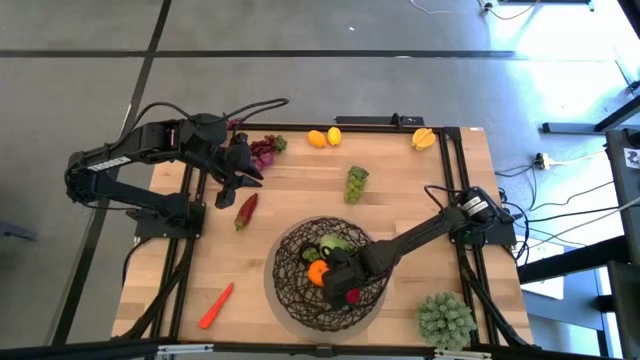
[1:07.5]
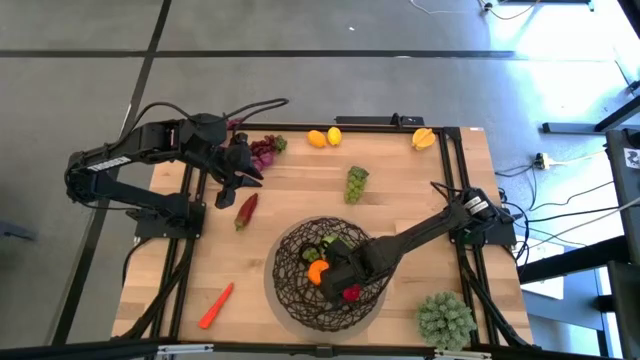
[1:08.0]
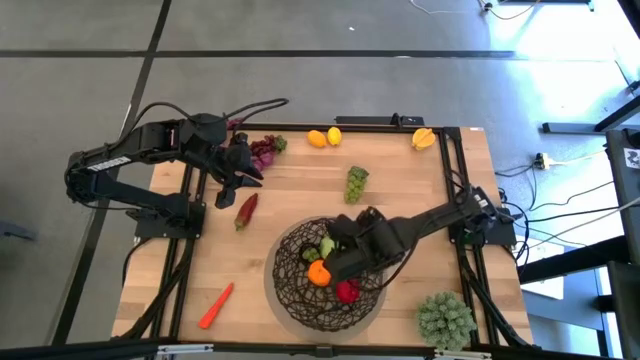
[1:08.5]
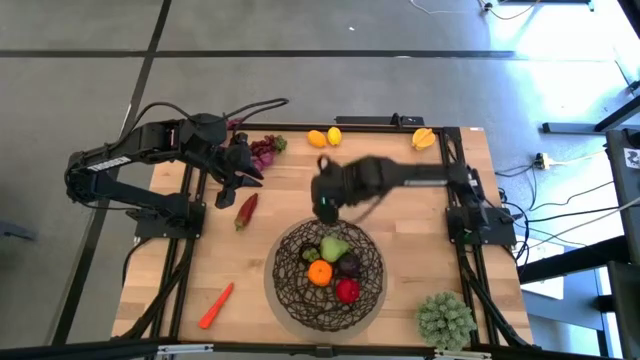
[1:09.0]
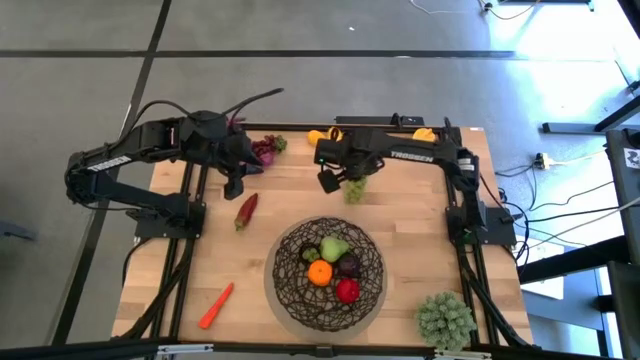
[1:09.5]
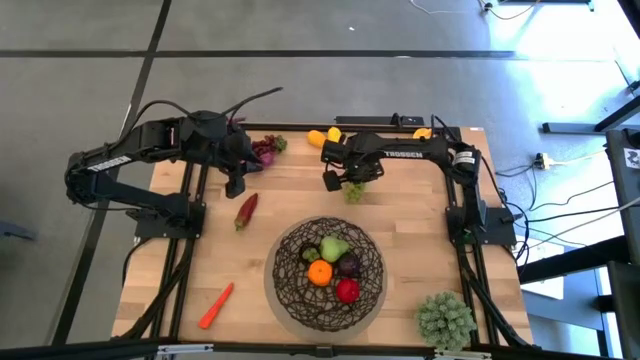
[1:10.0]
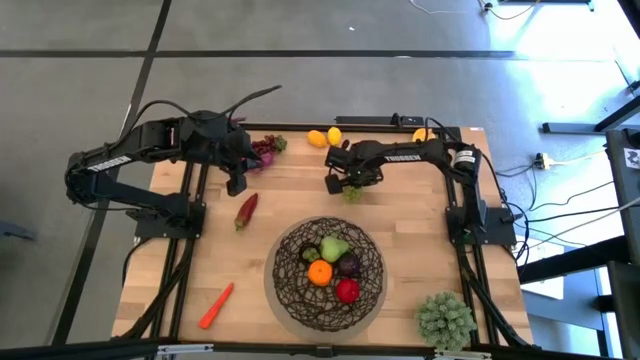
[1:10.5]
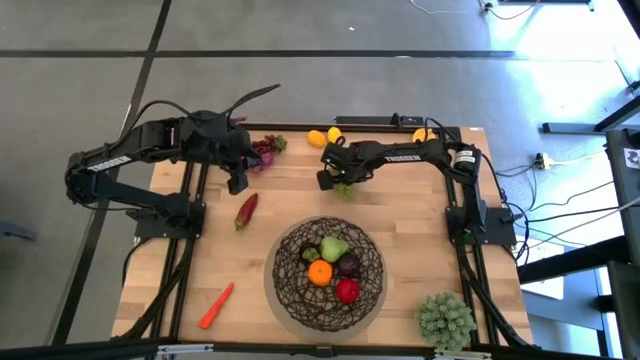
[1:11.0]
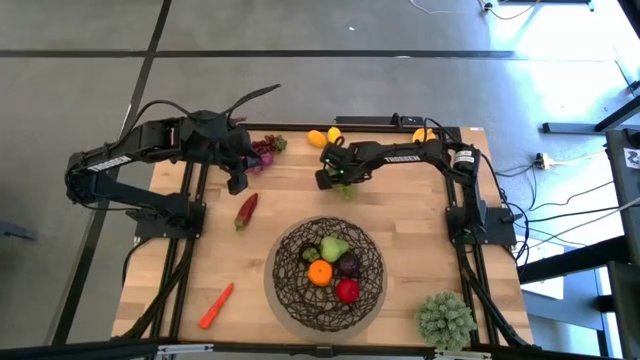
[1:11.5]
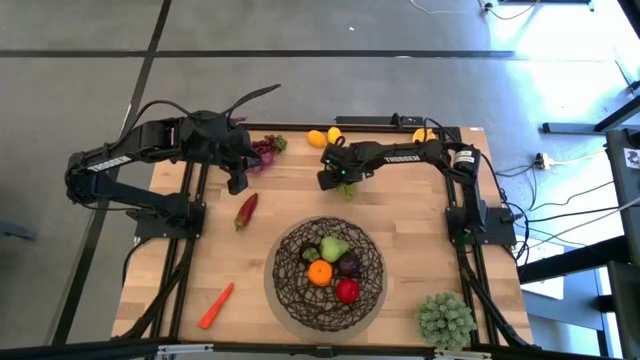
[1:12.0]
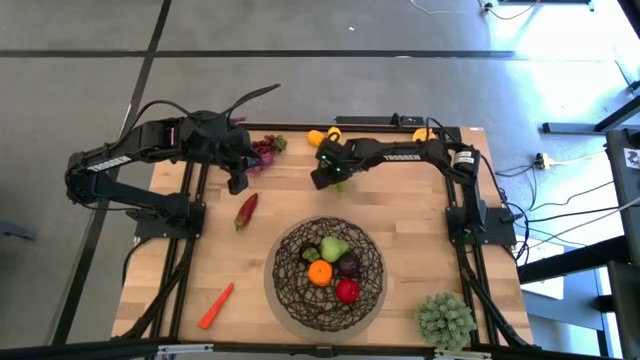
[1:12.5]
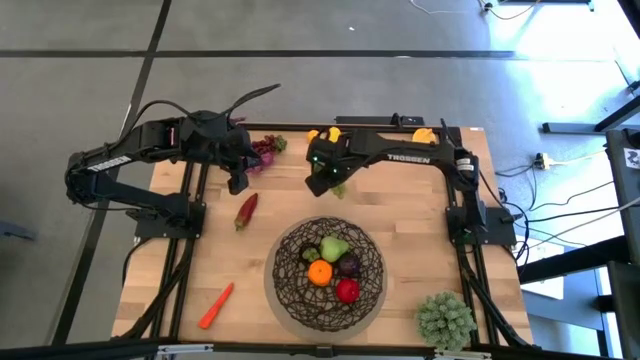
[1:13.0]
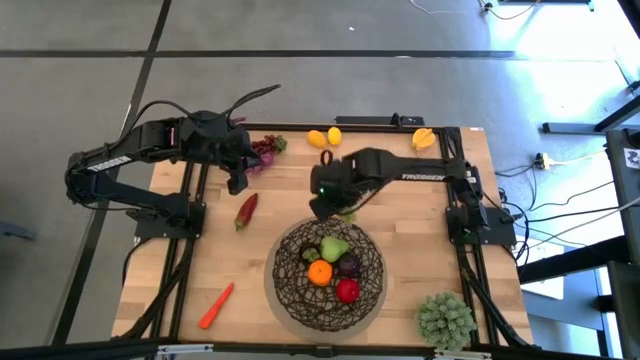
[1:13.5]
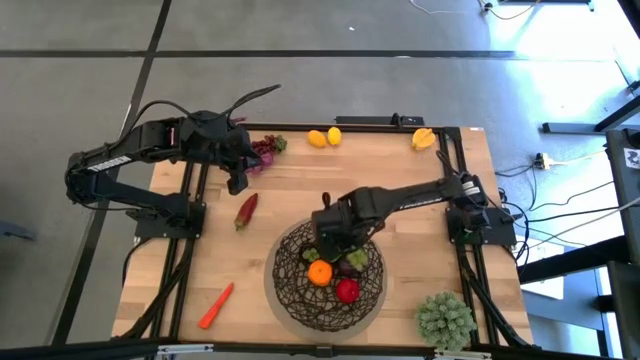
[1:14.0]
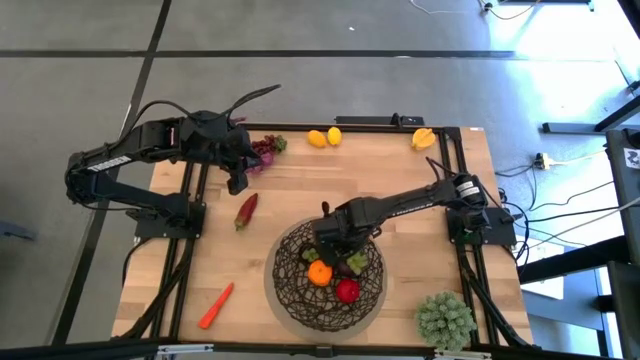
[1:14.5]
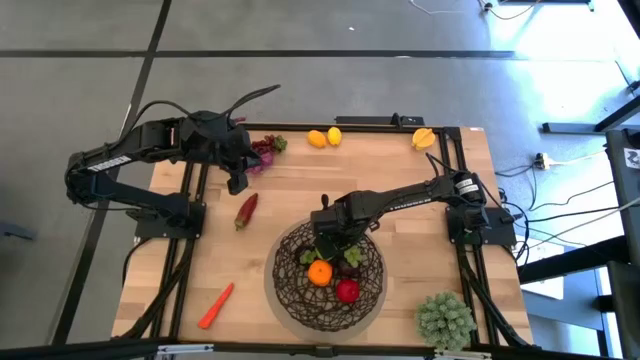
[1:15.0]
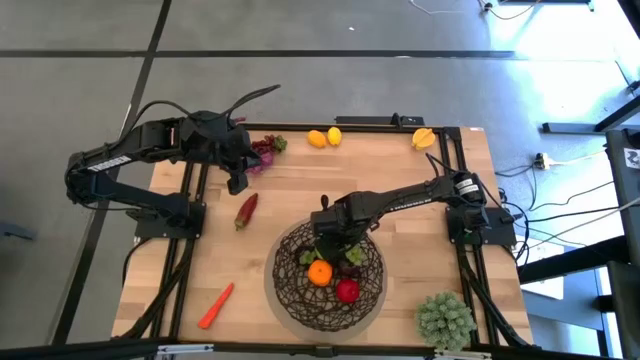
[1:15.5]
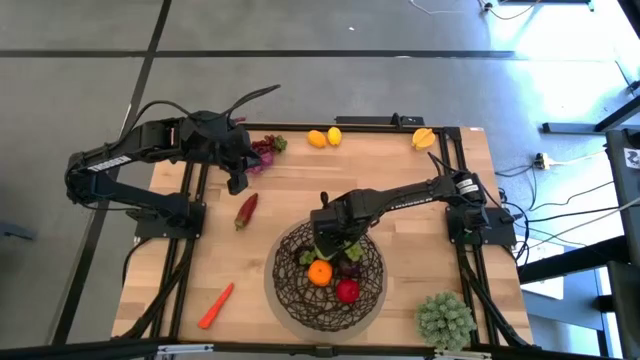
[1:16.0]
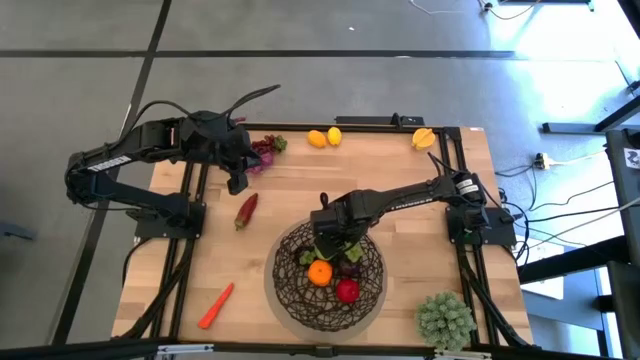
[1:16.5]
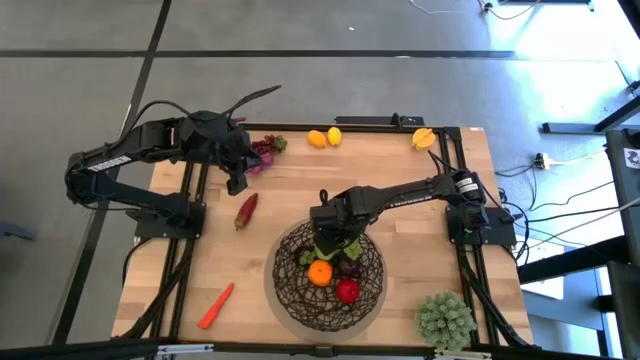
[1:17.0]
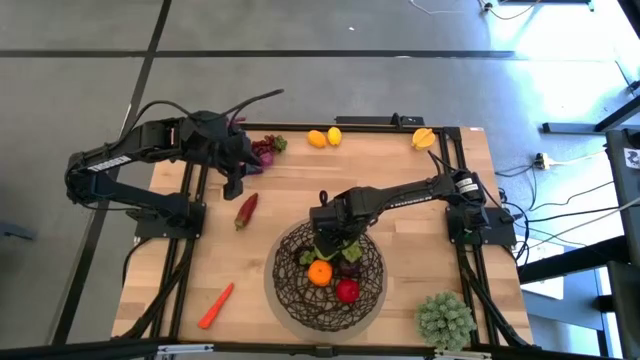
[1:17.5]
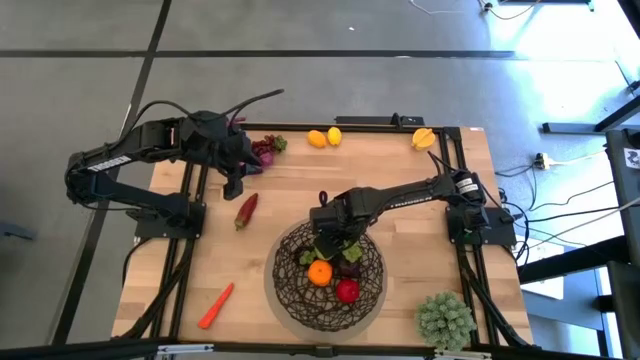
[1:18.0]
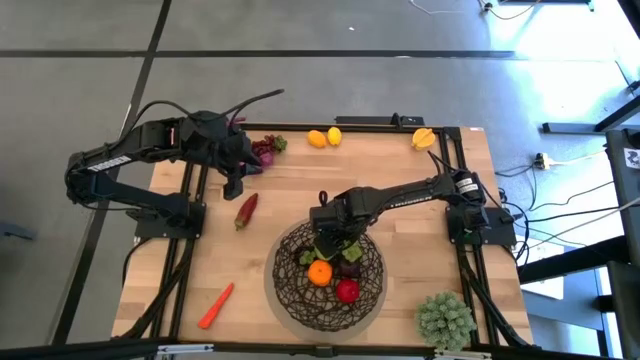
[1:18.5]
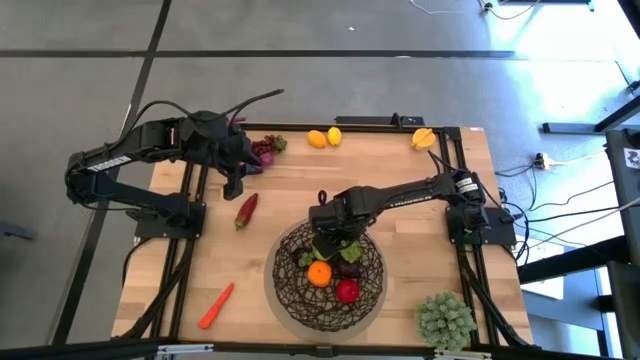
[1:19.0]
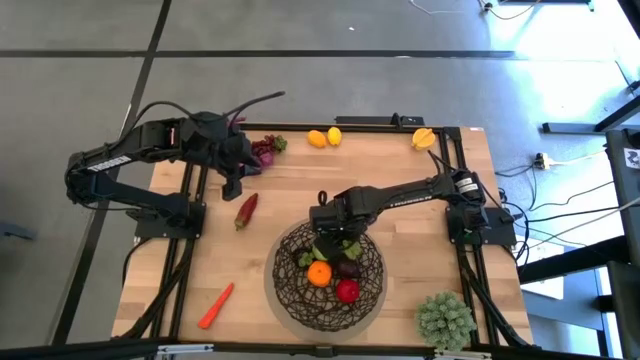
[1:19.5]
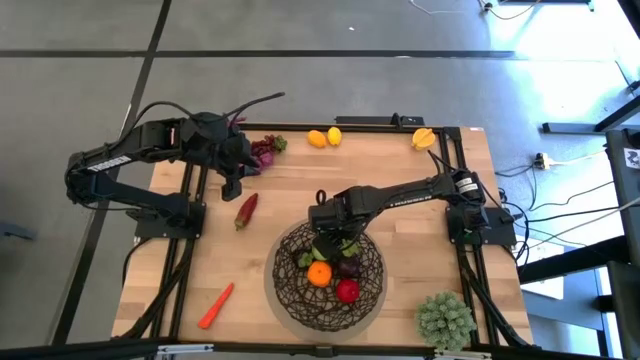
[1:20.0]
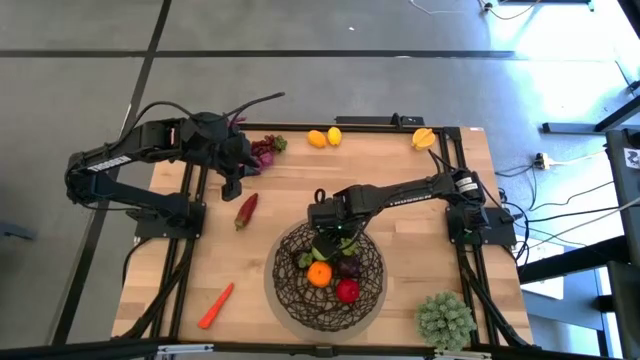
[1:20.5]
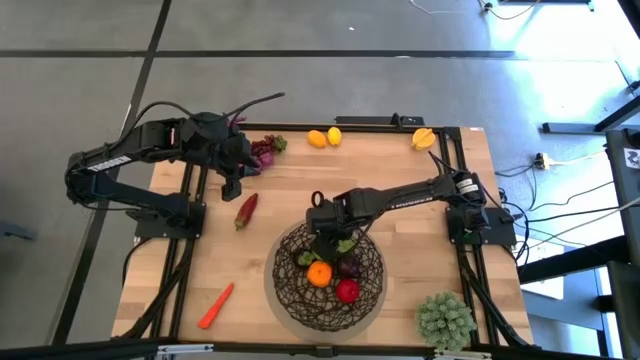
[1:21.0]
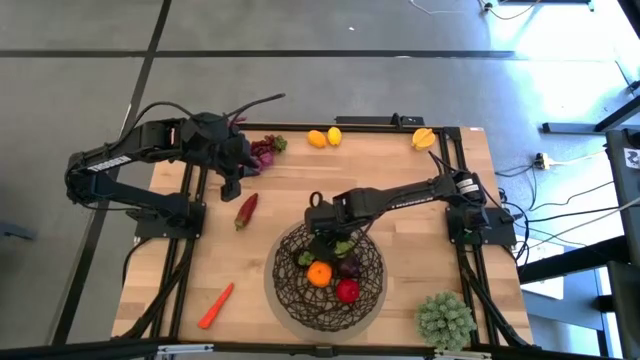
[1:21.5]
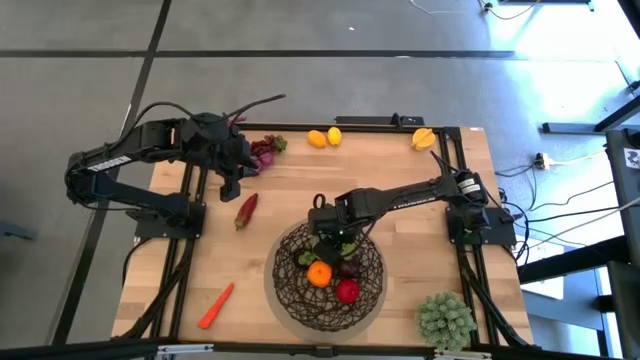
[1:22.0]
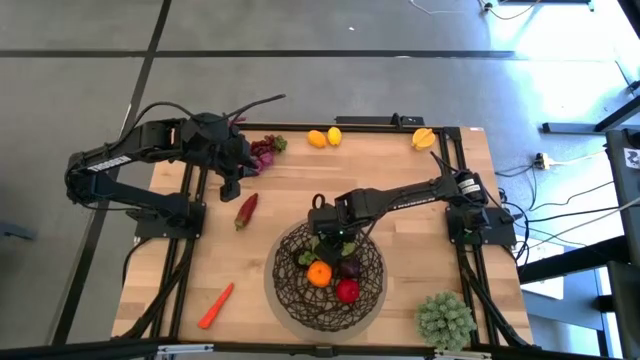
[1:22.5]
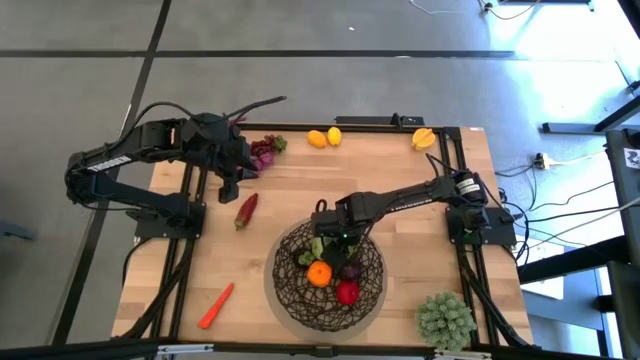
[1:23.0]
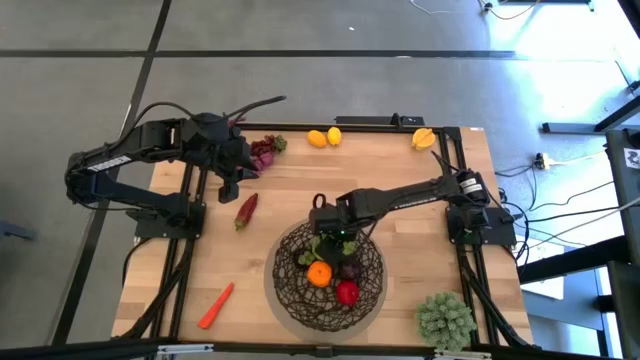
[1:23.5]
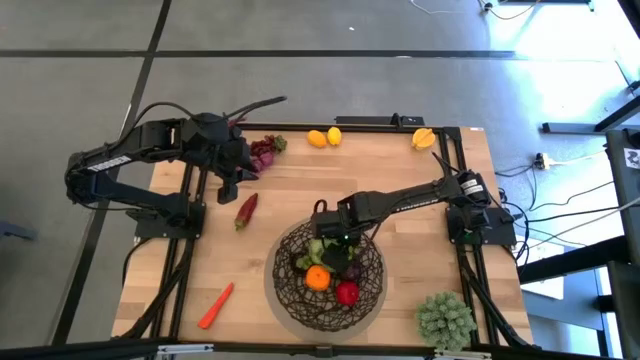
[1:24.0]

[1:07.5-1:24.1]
Task: Build produce basket
Put the green grapes into the mesh basket

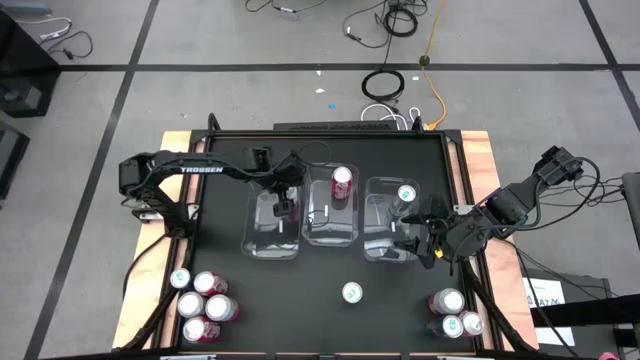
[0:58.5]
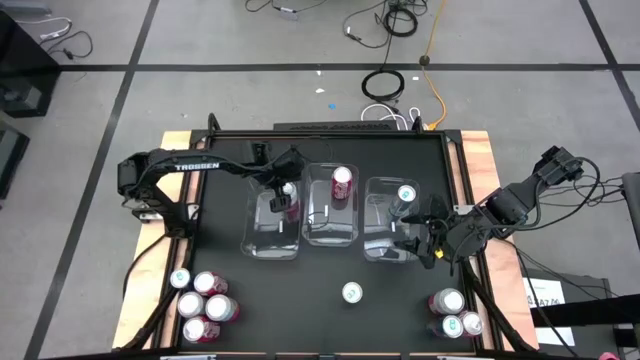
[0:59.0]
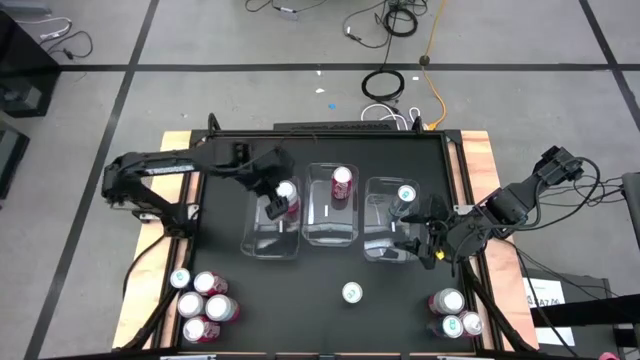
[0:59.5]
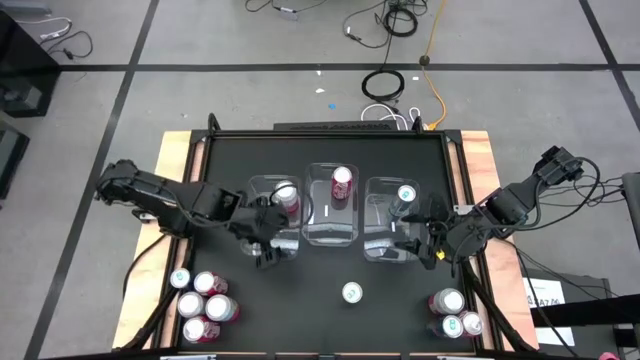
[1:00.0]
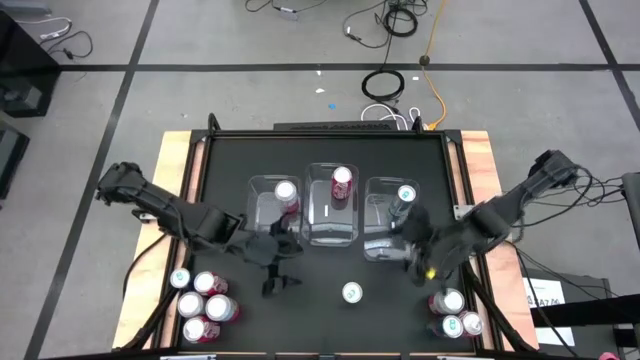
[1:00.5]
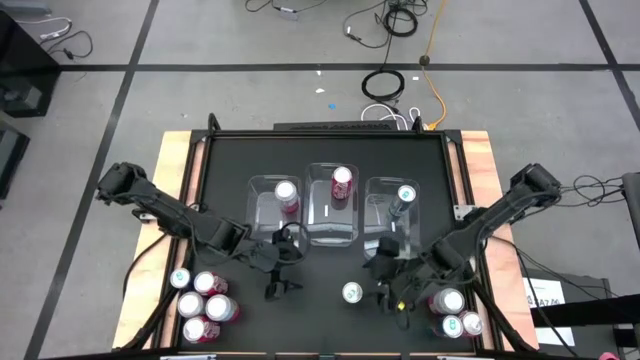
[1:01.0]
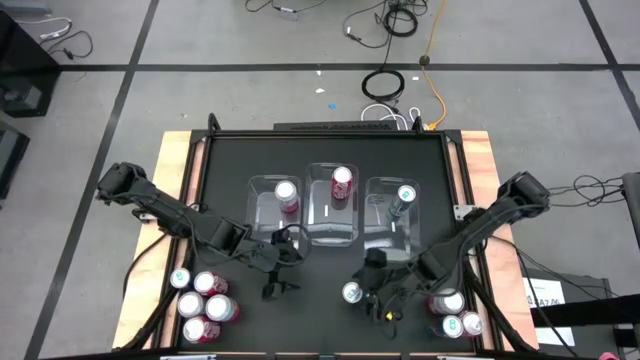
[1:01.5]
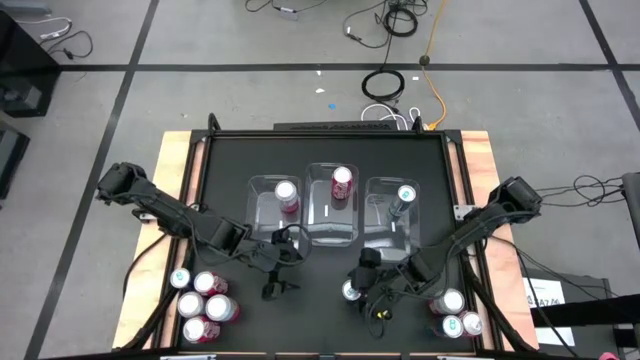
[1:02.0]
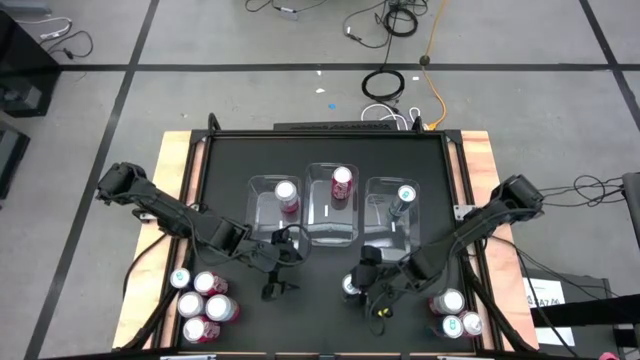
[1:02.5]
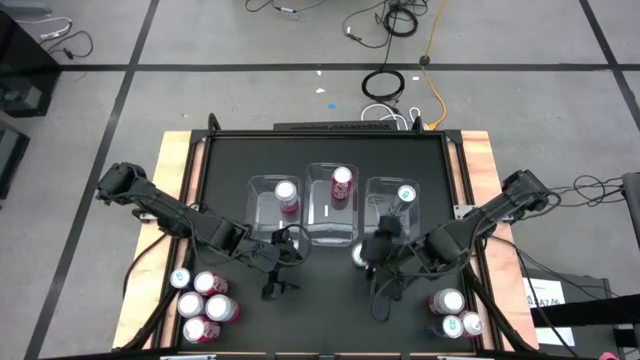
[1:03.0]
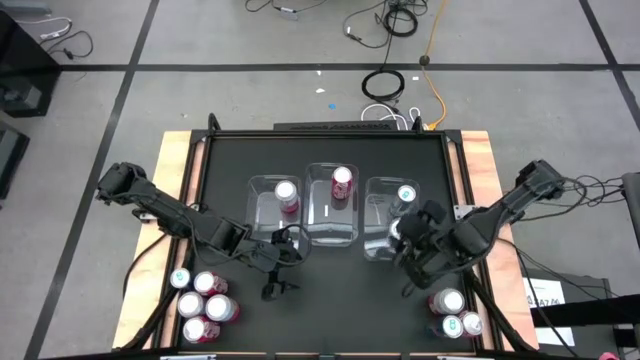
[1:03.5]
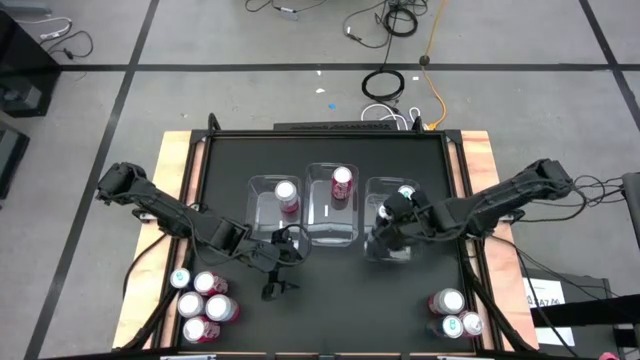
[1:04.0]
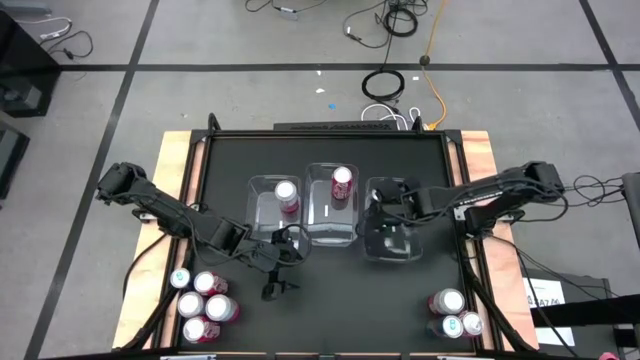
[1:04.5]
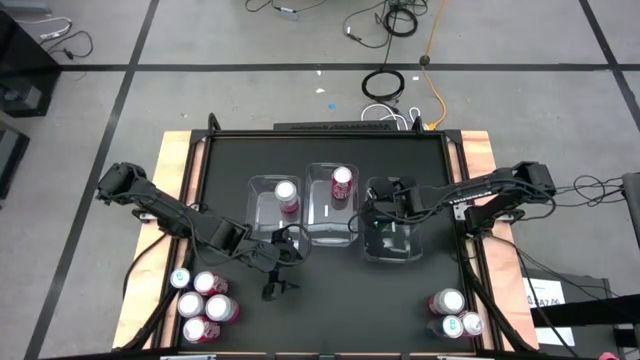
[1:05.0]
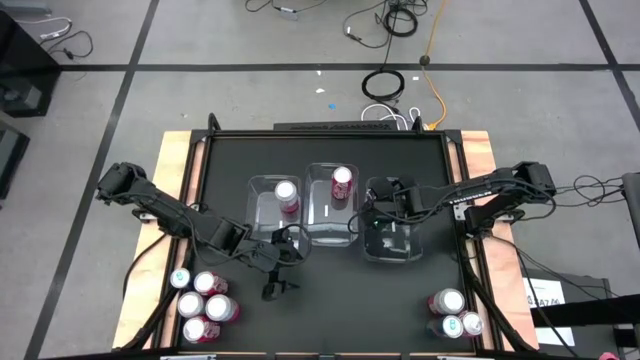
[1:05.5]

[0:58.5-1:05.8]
Task: Sort soda cans
Put the center silver blue soda can into the middle right transparent bin
